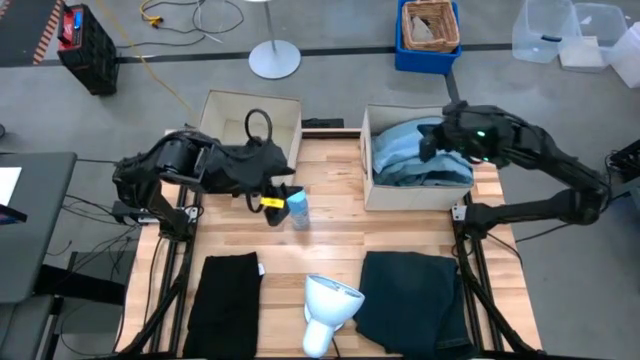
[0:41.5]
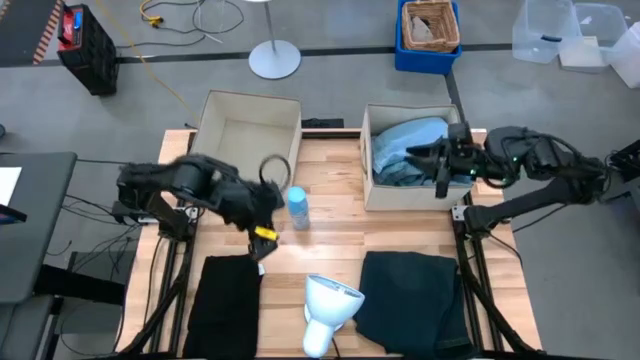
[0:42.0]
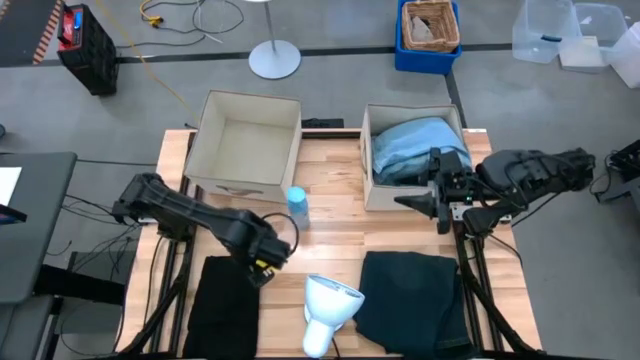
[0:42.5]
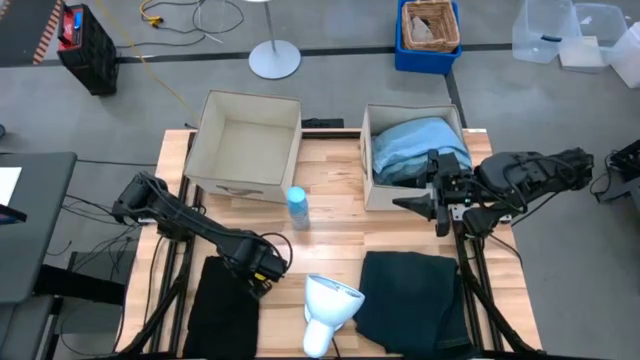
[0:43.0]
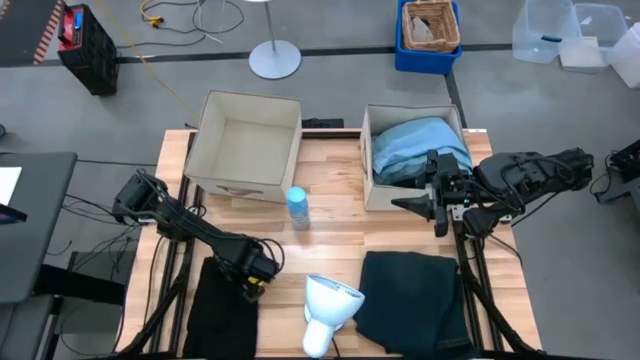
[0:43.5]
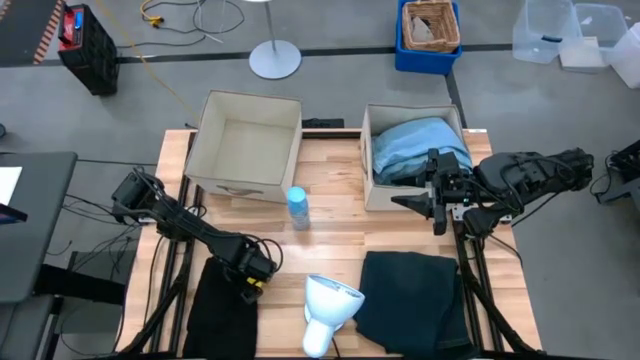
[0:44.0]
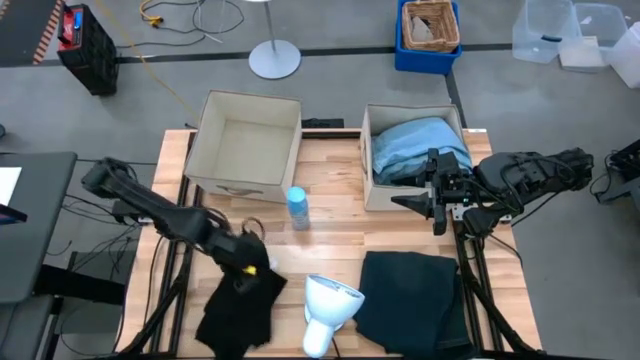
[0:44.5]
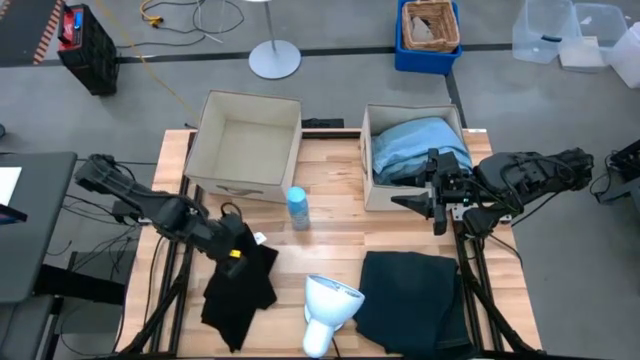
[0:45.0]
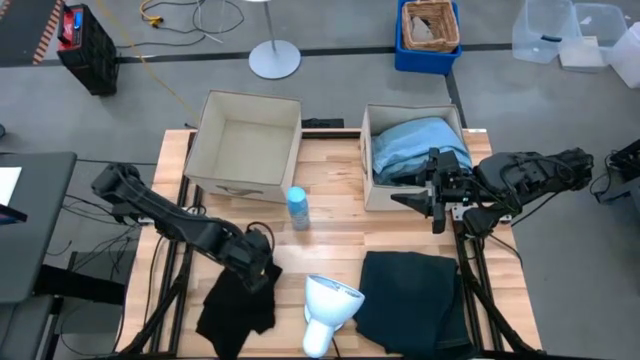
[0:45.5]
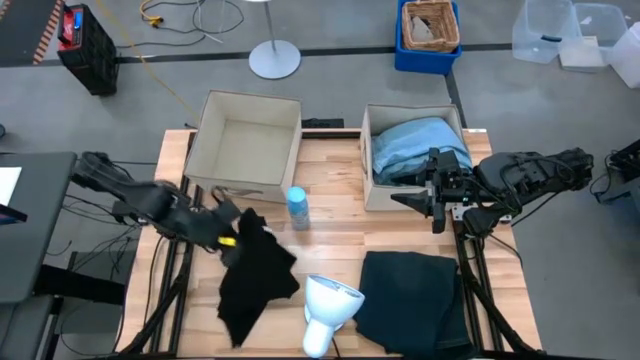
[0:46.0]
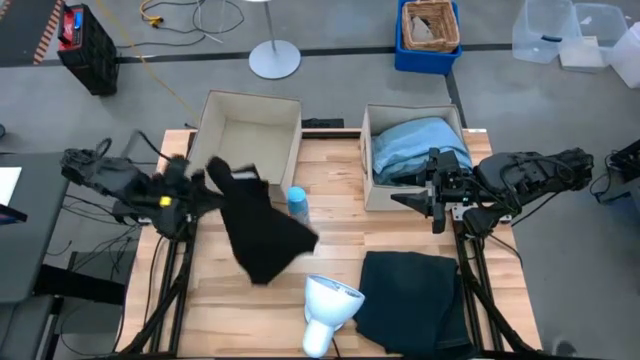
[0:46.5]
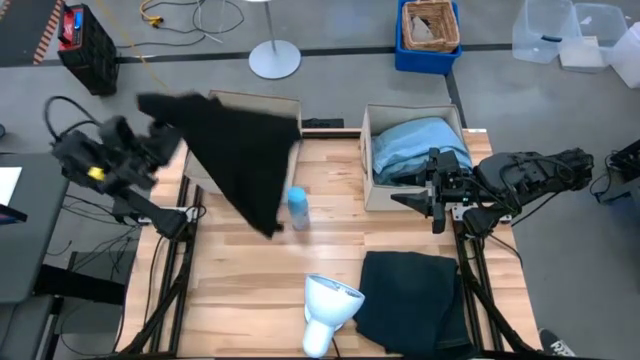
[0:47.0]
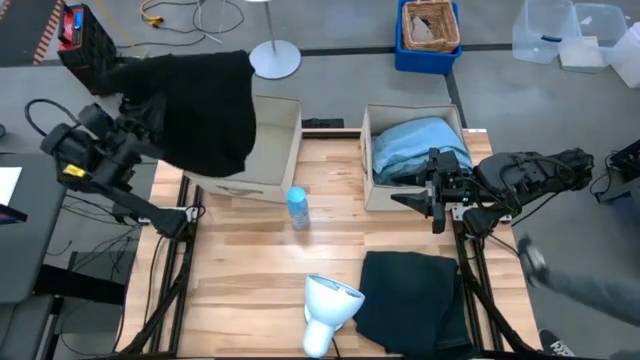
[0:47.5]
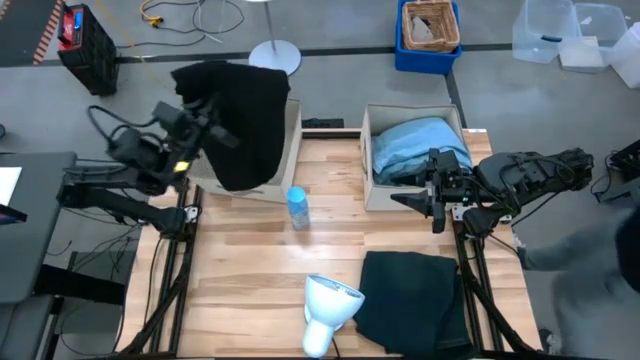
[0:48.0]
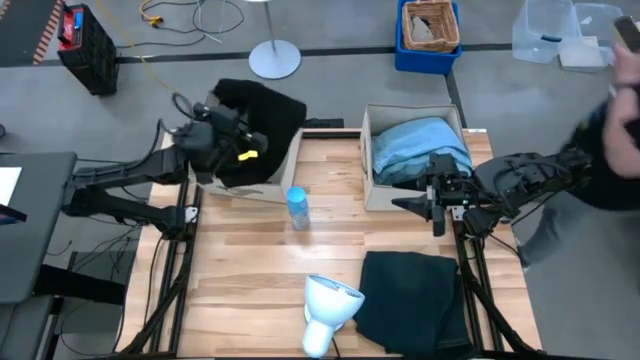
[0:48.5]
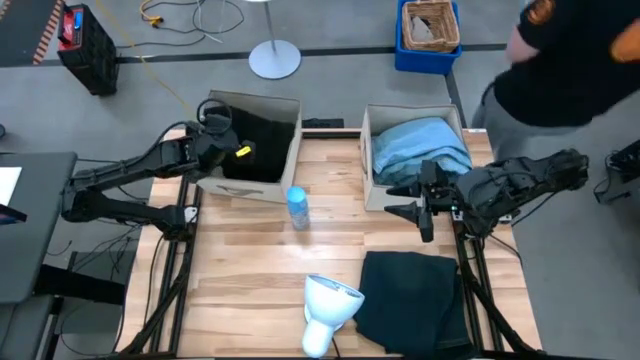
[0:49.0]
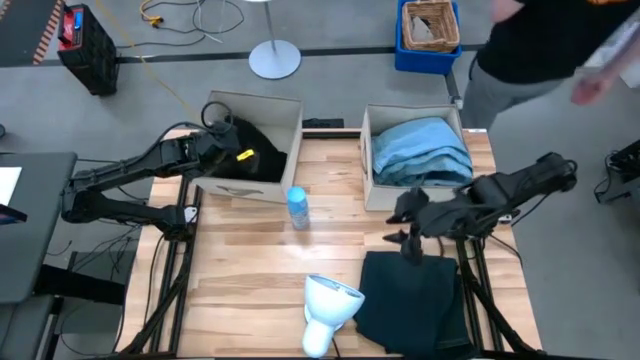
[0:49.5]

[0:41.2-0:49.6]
Task: Sort clothes
Put the black shorts into the left laundry organizer

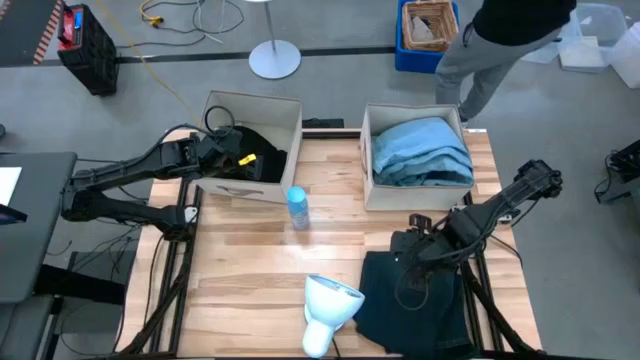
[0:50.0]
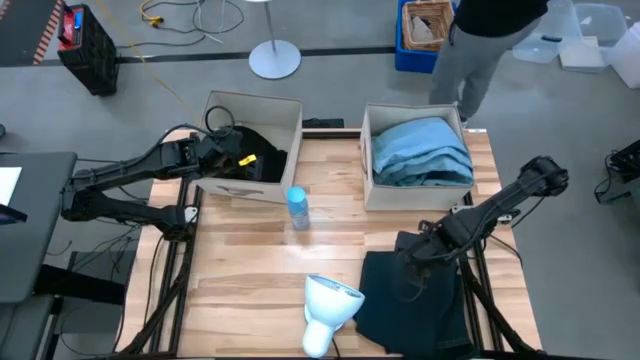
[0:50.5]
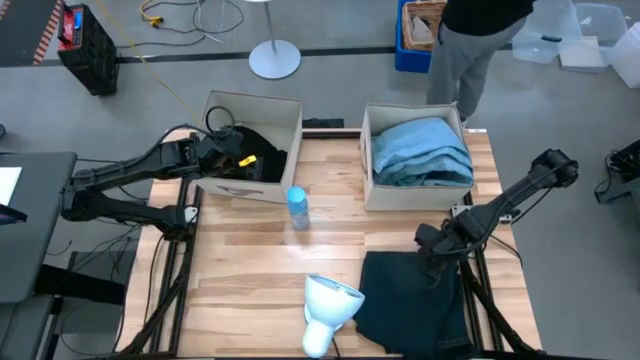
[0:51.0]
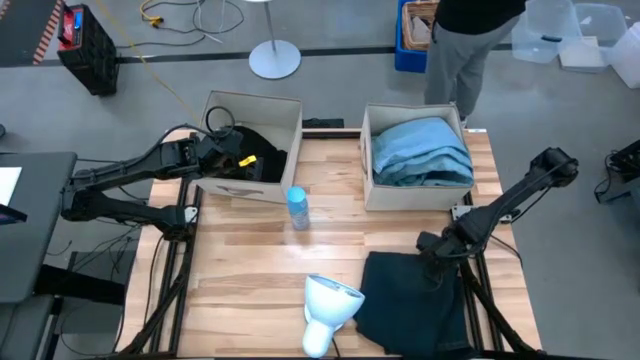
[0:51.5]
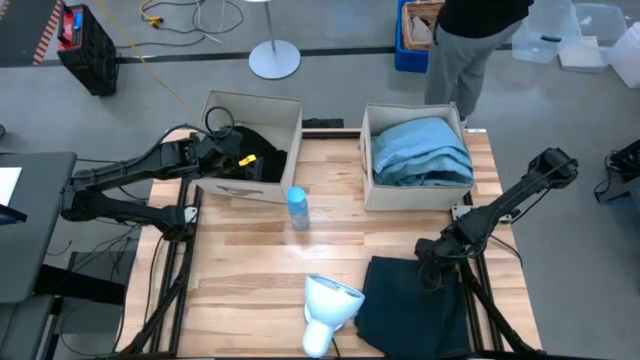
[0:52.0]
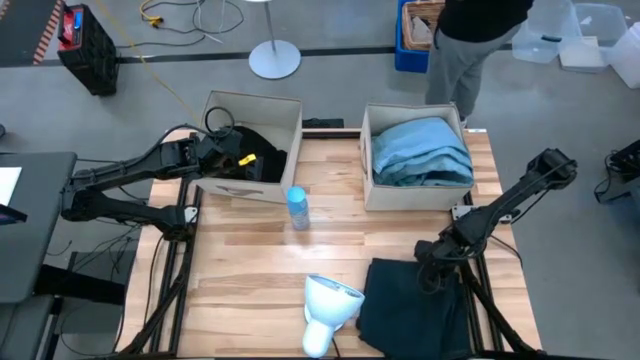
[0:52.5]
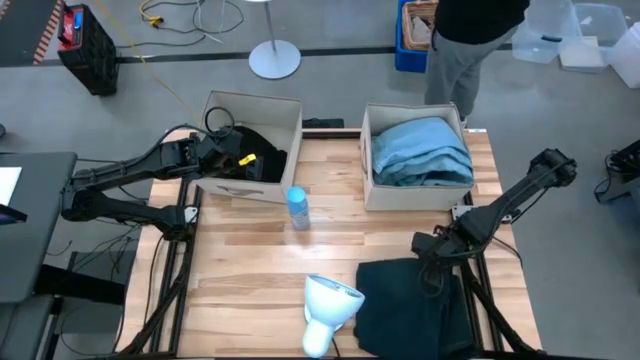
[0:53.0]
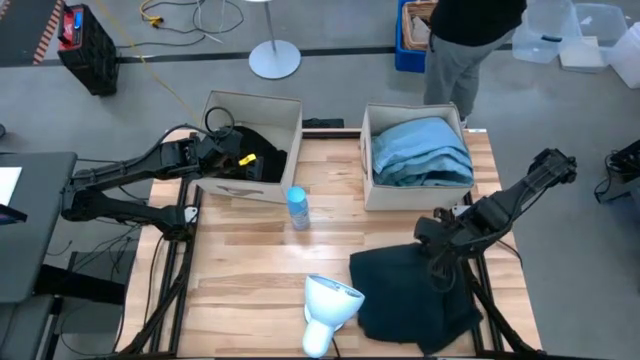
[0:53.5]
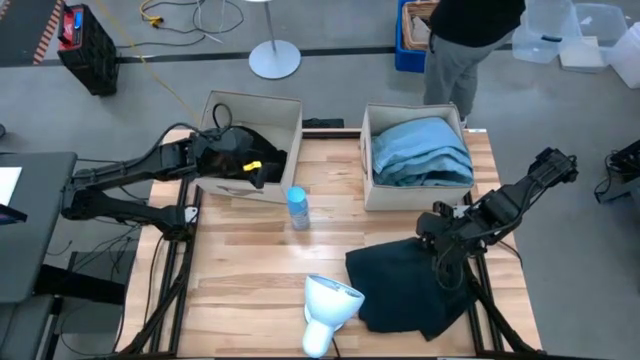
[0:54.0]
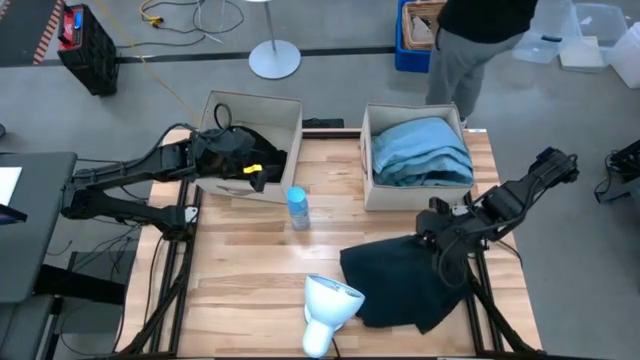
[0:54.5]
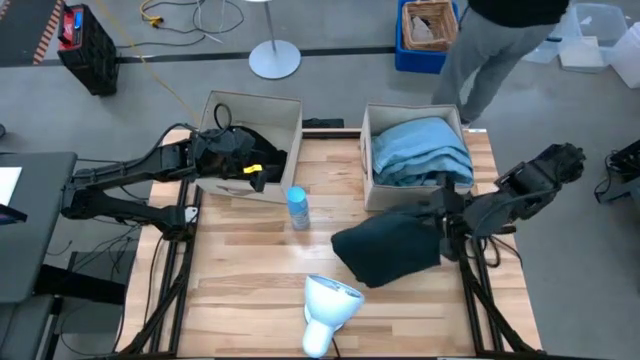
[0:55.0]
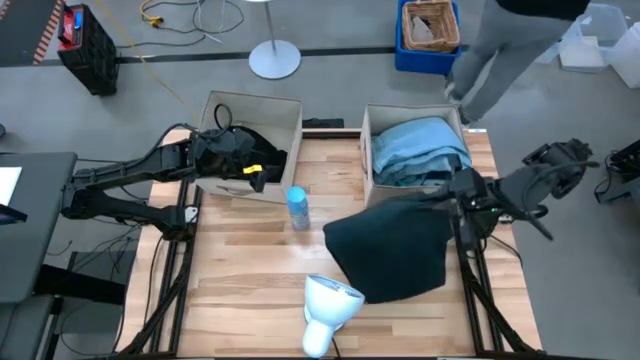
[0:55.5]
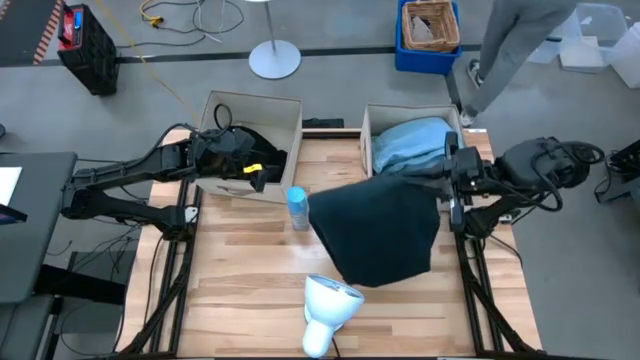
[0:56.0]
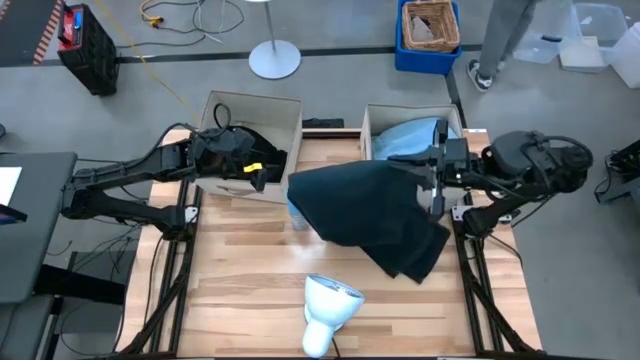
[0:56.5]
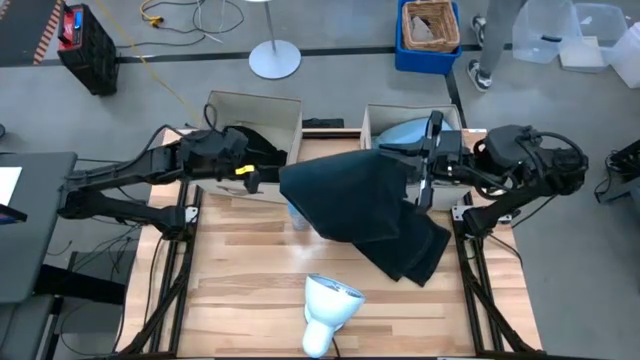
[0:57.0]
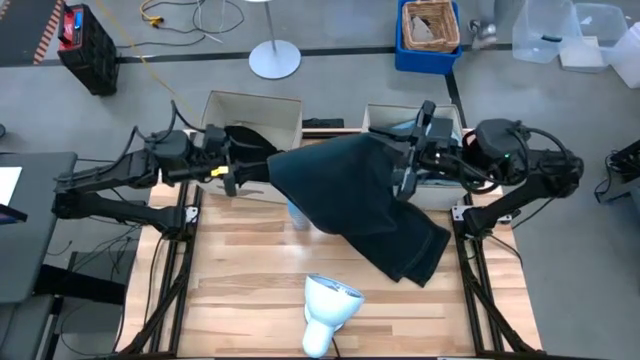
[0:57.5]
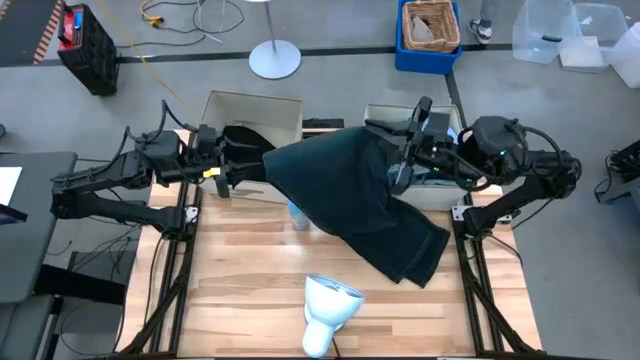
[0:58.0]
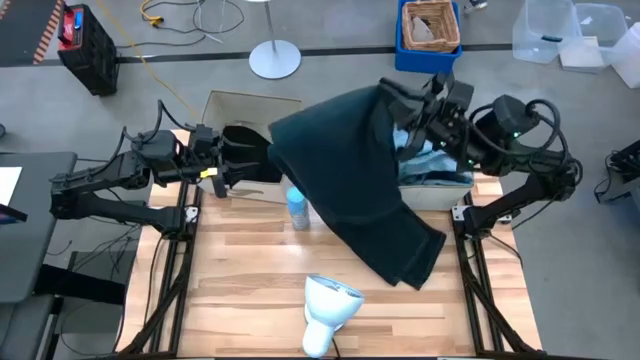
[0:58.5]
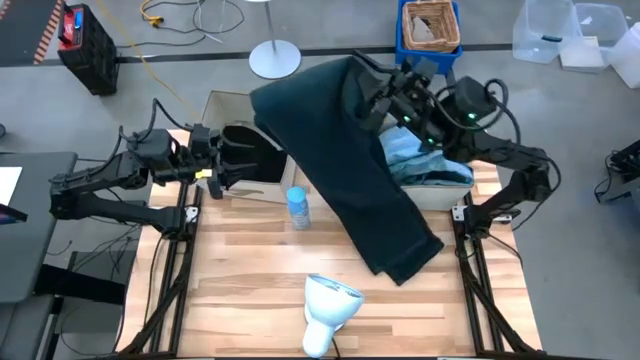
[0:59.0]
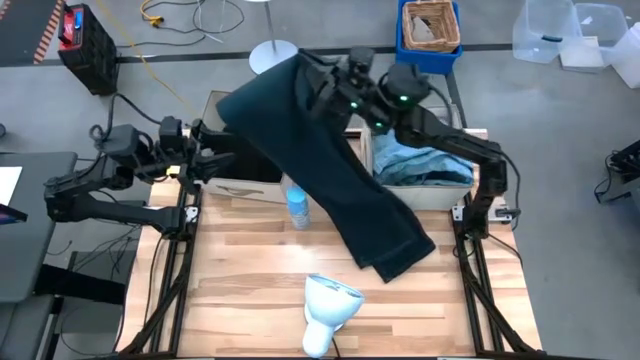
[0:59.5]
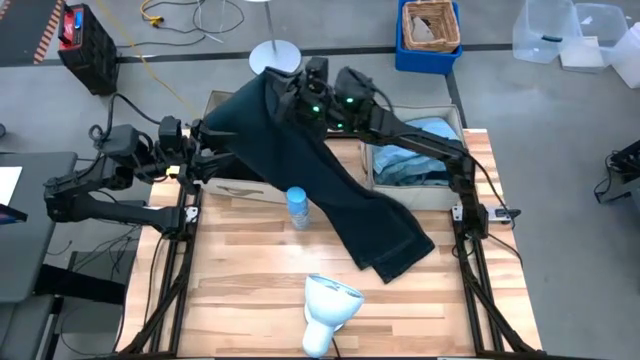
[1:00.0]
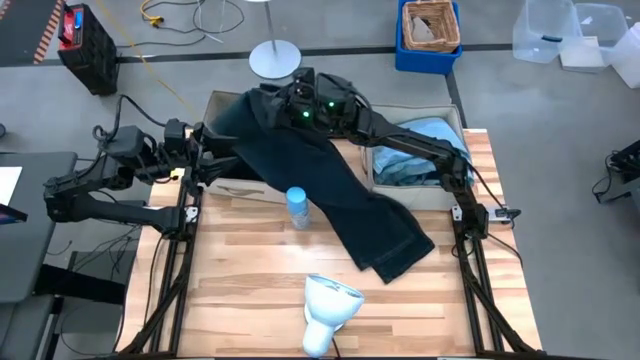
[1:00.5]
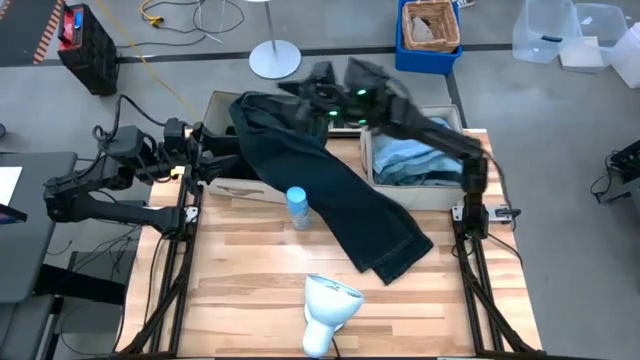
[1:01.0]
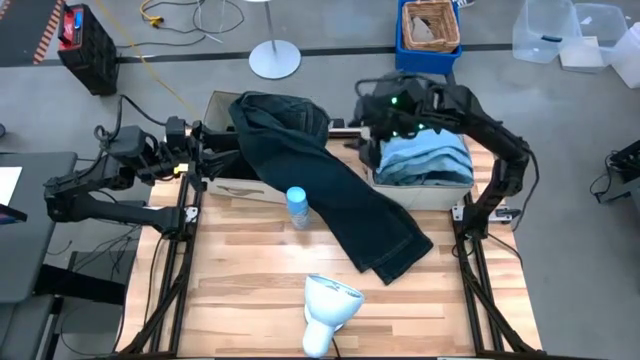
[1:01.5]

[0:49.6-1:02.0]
Put the dark blue pants into the left laundry organizer

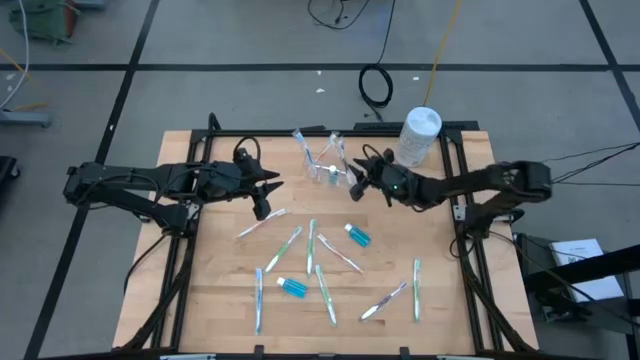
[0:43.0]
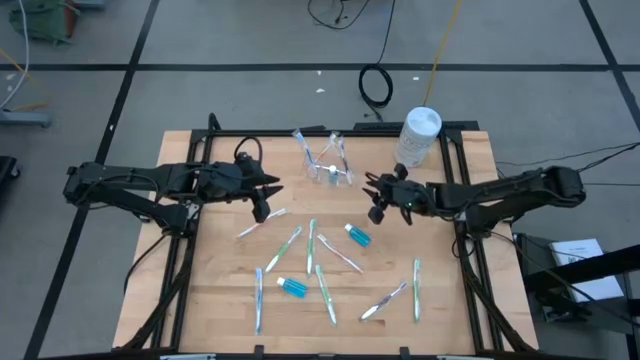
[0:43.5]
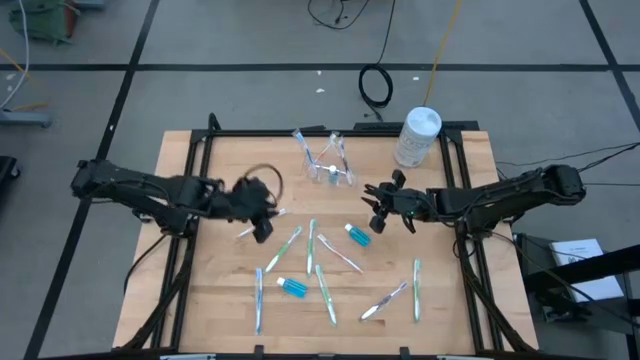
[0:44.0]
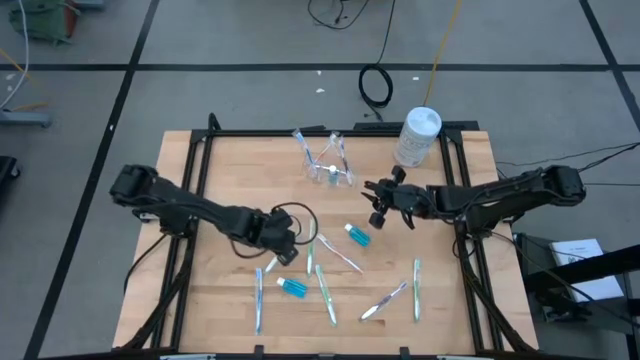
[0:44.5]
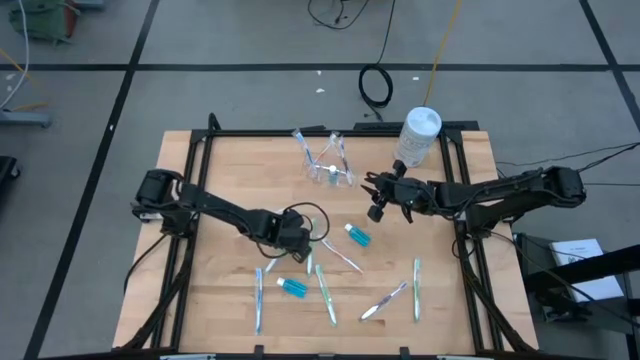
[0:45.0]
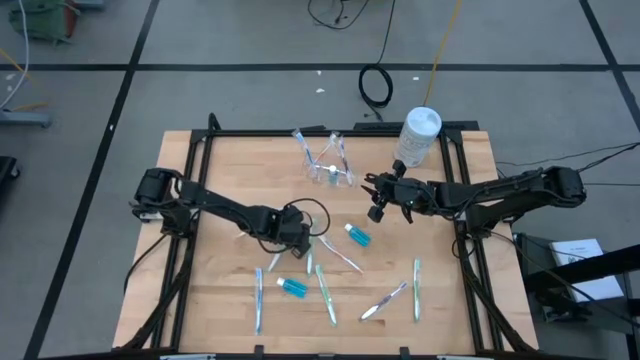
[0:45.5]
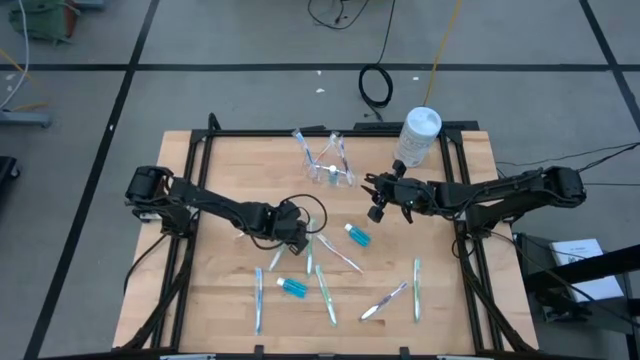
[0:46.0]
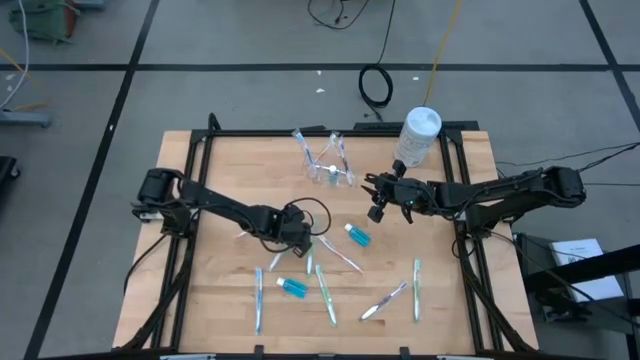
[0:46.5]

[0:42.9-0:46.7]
Task: Pick & Place toothbrushing station
Put the green toothbrush into the transparent organizer
